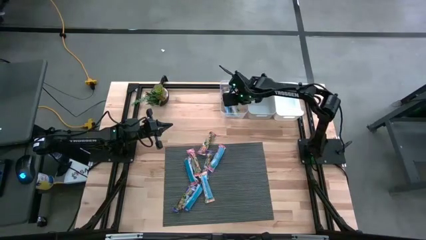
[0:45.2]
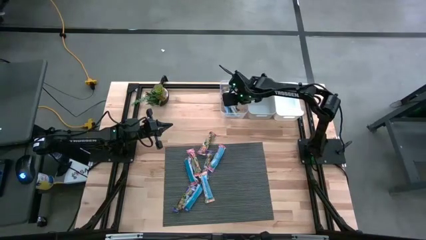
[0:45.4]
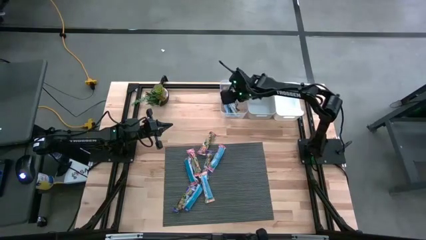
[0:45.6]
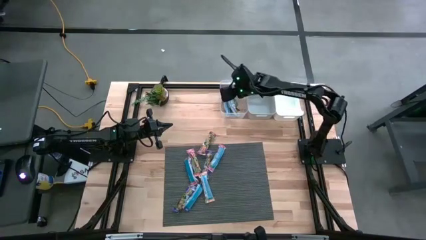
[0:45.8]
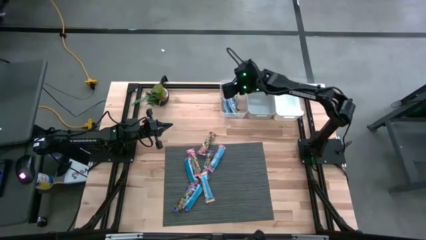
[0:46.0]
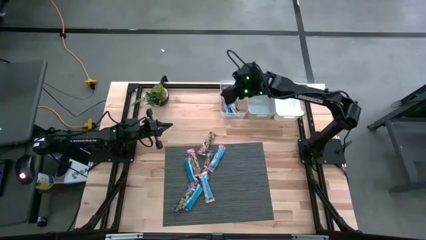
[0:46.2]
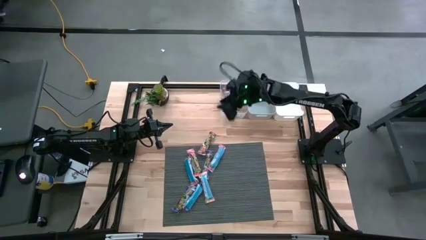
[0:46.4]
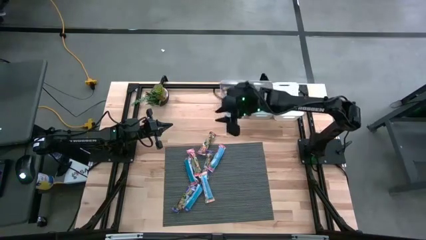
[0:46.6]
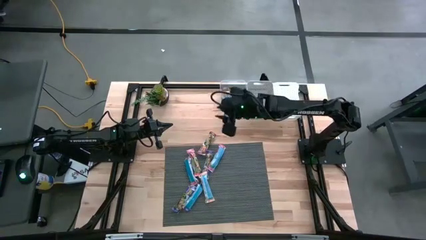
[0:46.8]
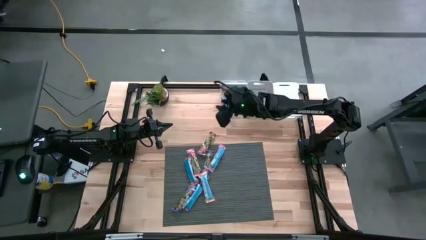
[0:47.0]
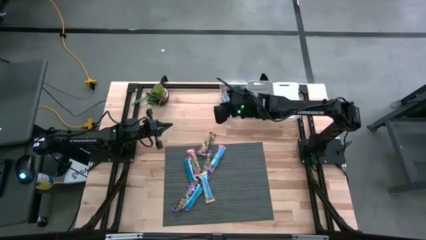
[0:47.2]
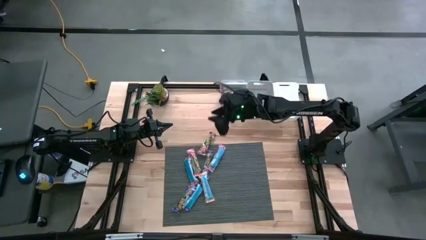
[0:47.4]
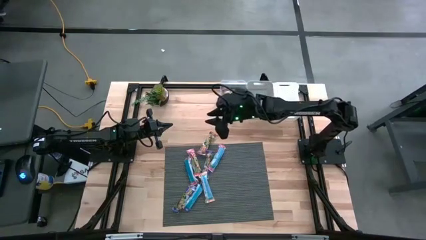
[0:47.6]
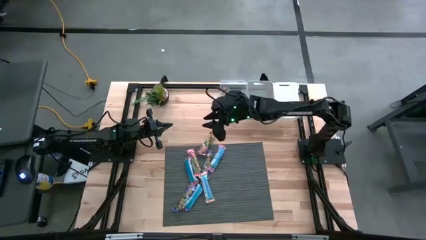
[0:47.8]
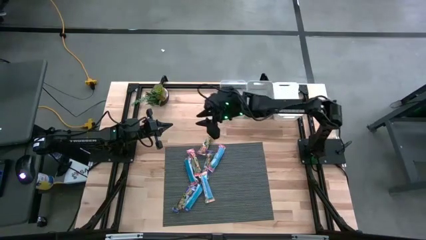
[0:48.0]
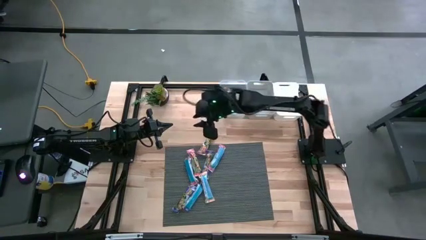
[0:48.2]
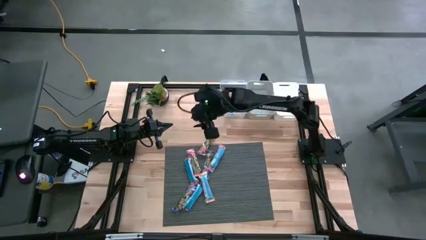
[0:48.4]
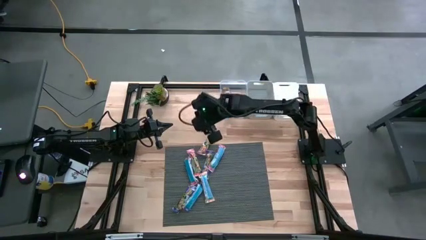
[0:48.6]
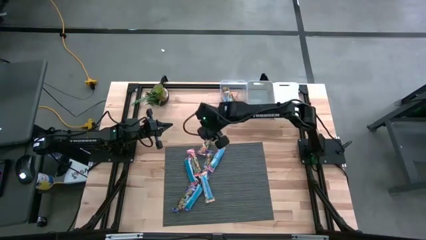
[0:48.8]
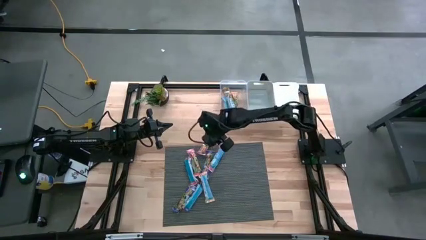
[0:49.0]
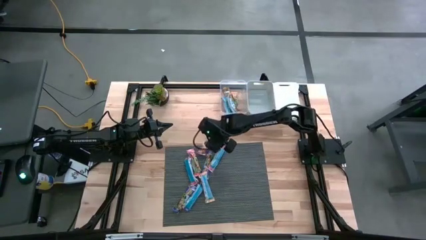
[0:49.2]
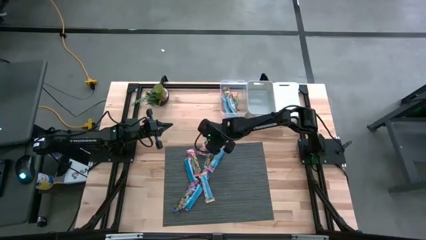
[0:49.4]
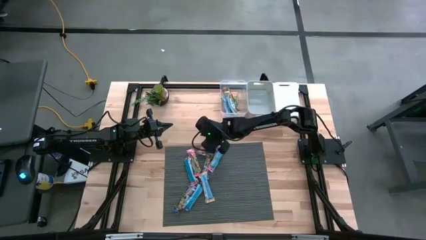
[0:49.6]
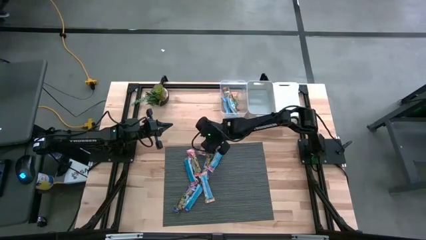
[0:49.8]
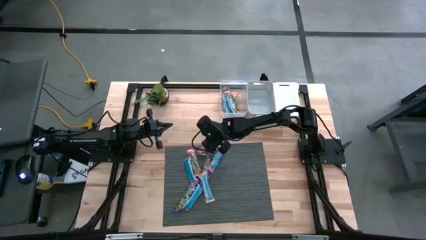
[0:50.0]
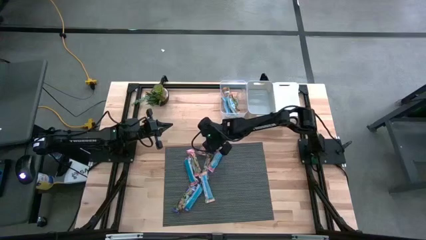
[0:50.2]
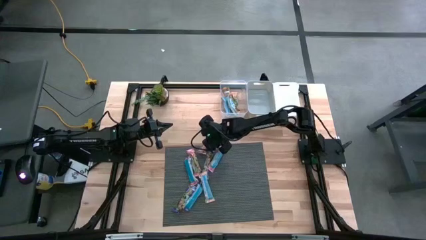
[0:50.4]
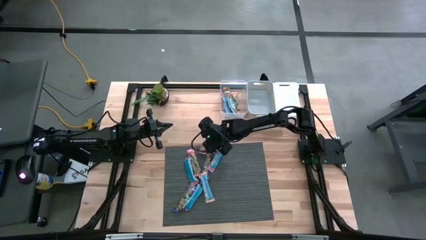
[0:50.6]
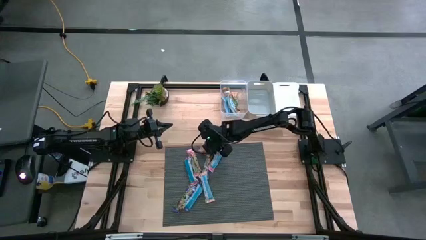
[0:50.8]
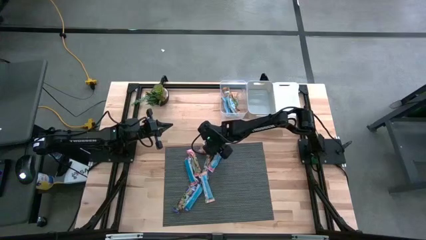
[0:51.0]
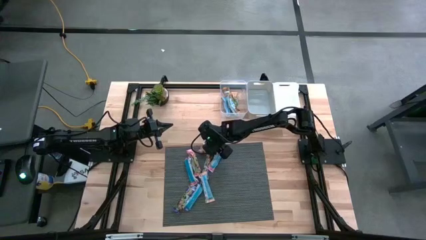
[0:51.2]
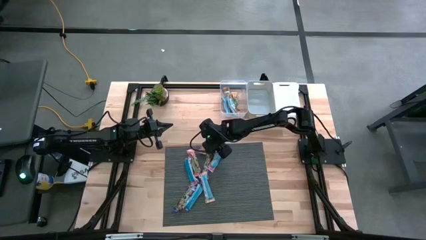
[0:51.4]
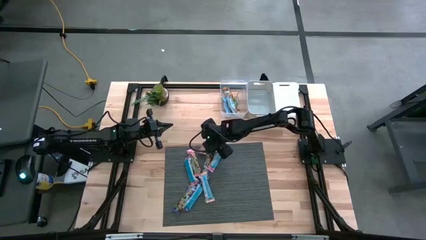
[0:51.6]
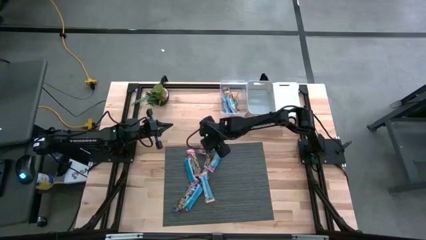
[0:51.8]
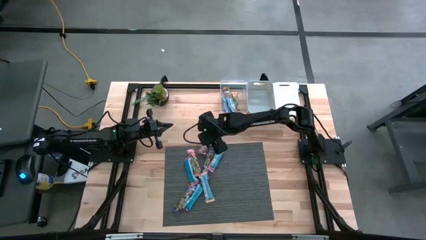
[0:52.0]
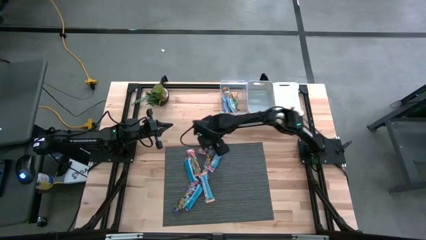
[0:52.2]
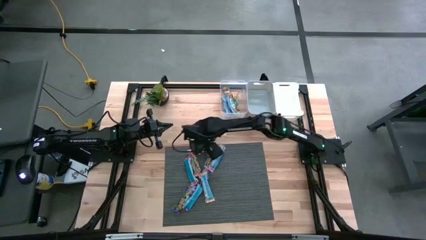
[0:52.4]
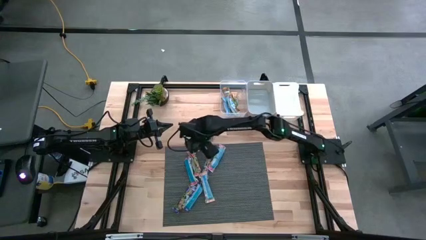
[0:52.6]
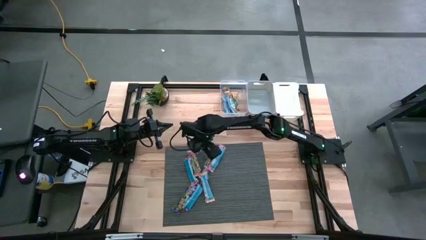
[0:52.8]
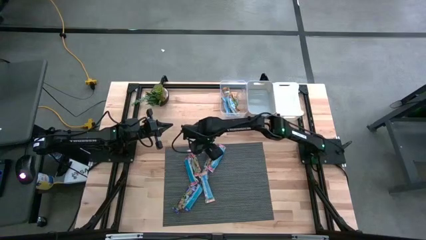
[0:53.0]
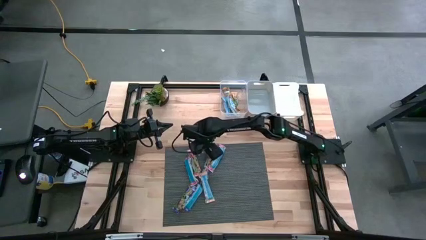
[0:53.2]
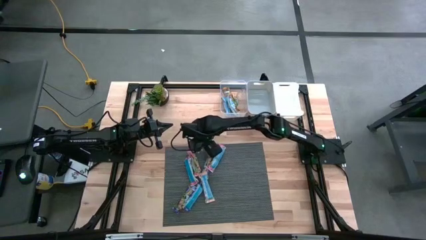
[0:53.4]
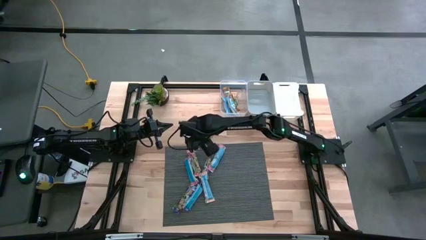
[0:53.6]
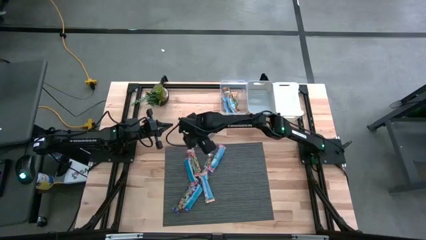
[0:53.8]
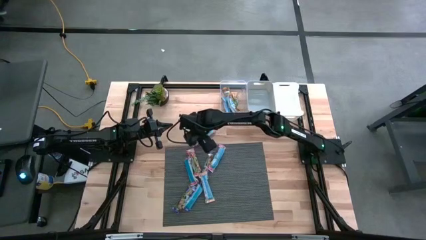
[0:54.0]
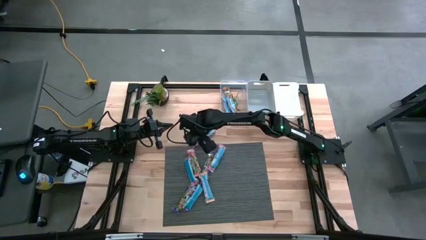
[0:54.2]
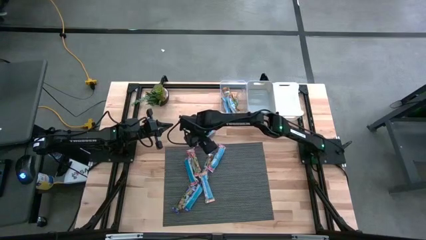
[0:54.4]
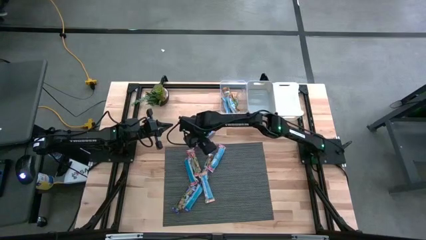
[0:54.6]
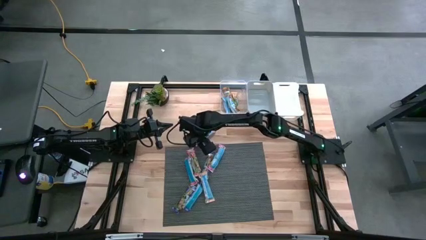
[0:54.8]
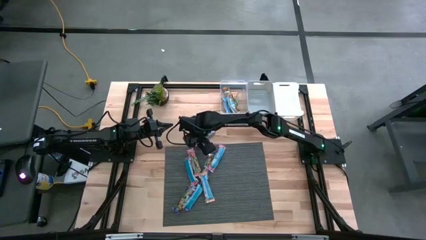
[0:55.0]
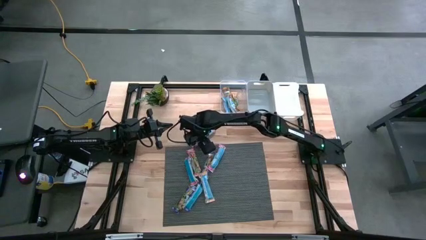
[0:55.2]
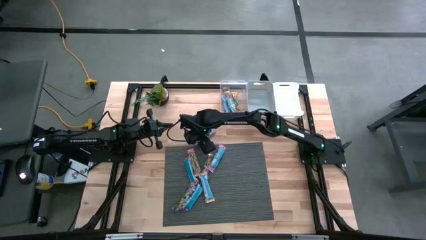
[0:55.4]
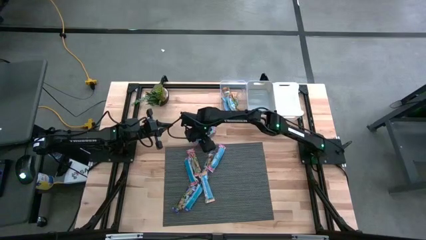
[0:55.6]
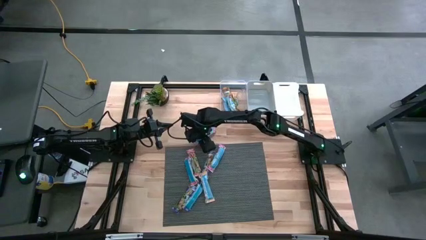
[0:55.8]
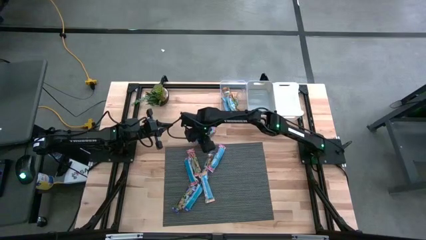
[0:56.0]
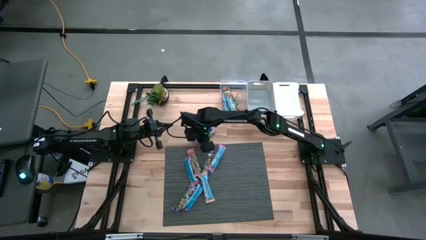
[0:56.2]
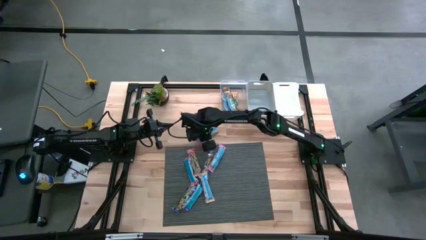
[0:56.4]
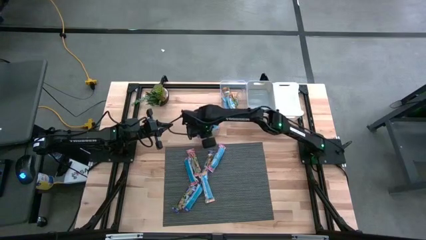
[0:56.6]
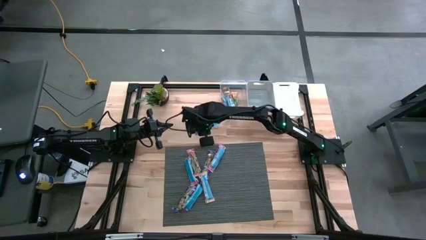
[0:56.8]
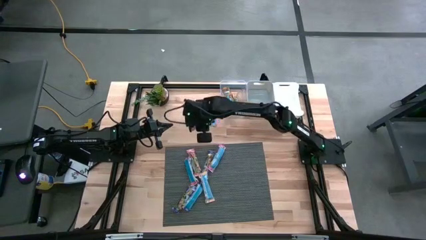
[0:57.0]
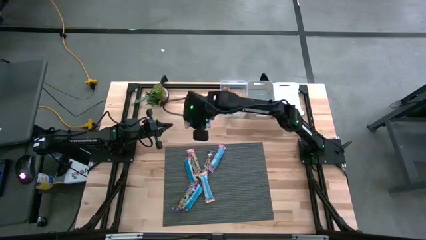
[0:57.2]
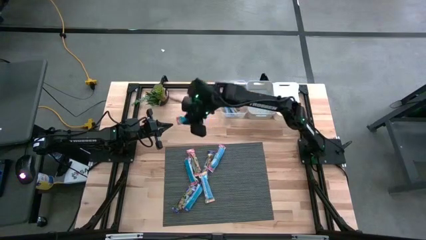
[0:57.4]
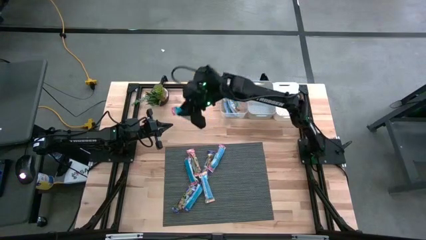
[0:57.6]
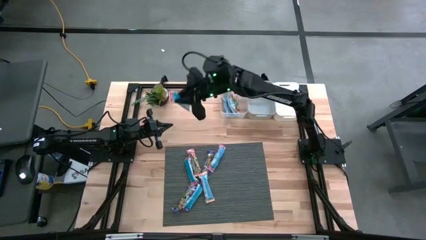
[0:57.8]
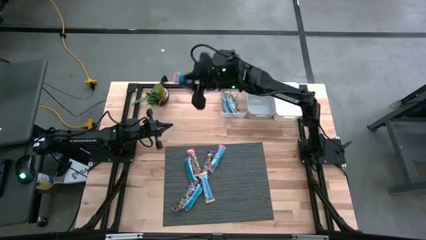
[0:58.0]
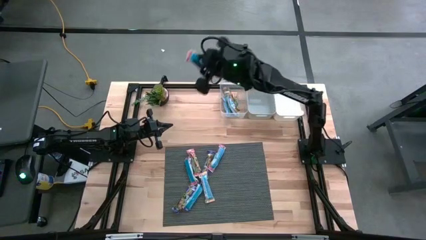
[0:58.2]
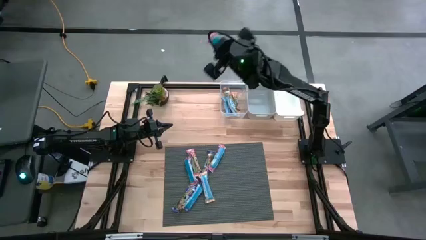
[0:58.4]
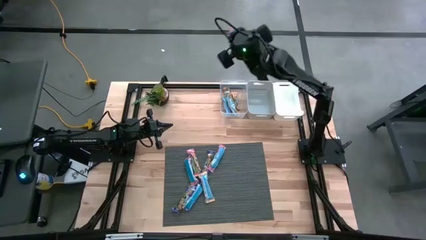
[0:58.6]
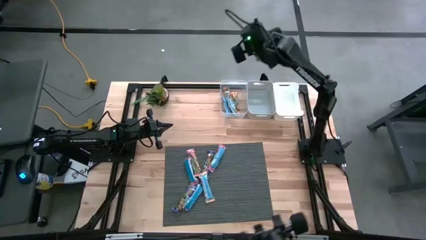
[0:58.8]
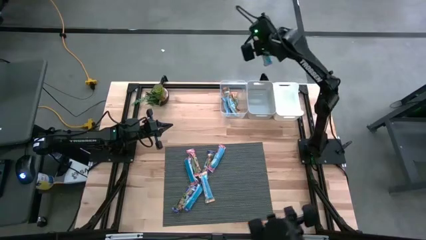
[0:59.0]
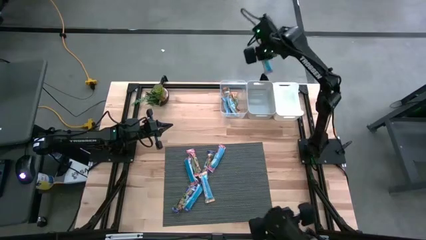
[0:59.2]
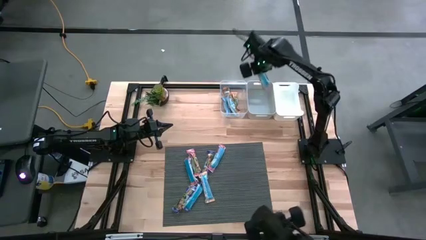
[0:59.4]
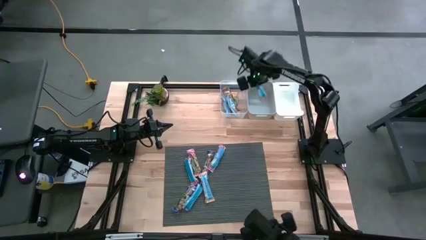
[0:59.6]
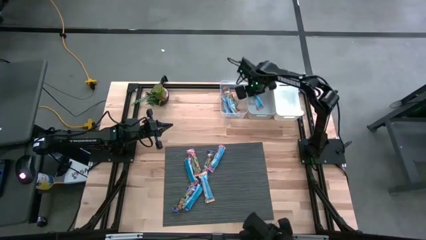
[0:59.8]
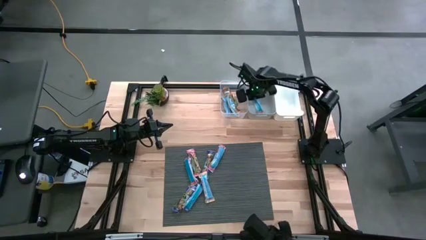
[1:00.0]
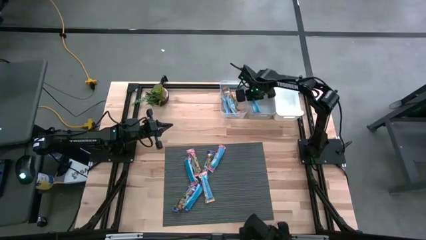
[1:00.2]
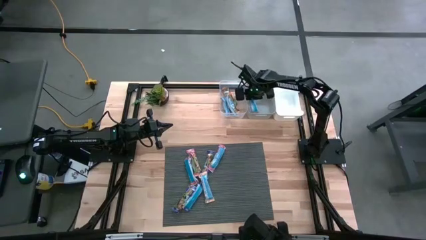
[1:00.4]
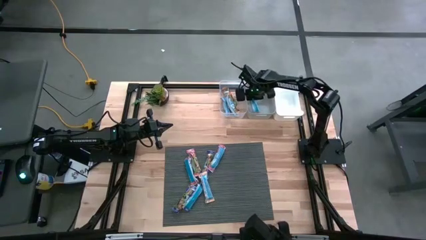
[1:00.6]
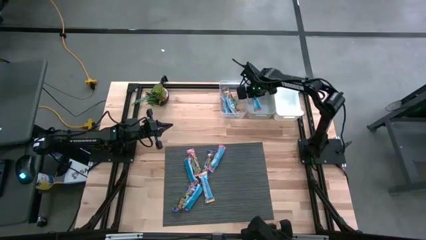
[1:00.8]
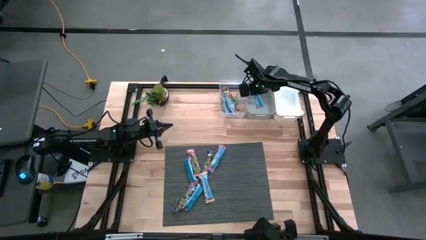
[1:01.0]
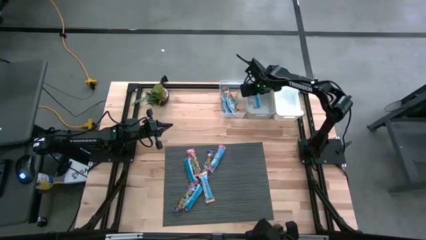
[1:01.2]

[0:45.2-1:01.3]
Task: Pick and place Granola Bars by type
Put the red granola bar into the gray bin
